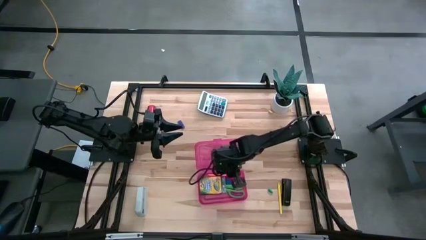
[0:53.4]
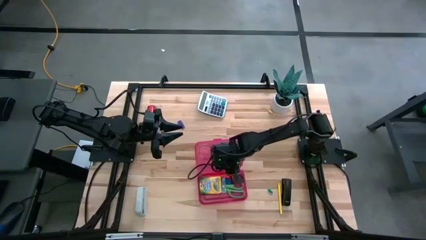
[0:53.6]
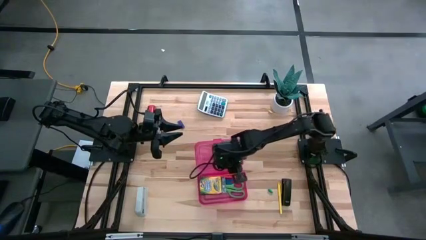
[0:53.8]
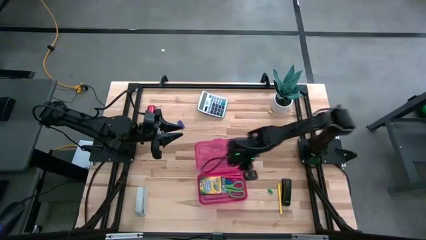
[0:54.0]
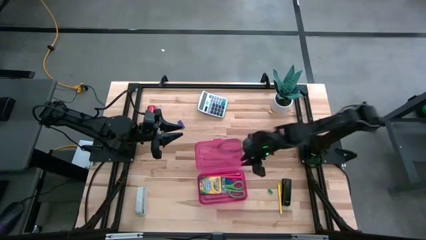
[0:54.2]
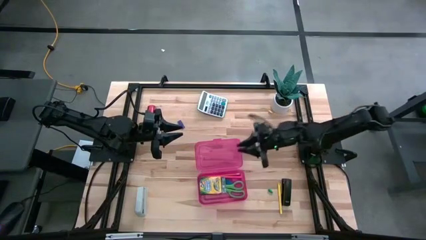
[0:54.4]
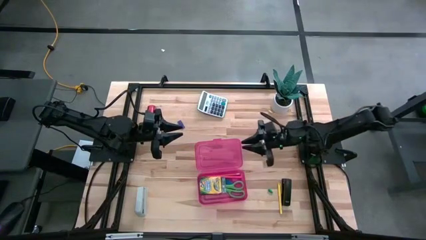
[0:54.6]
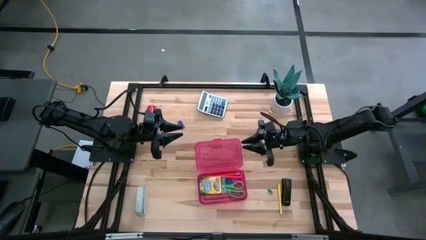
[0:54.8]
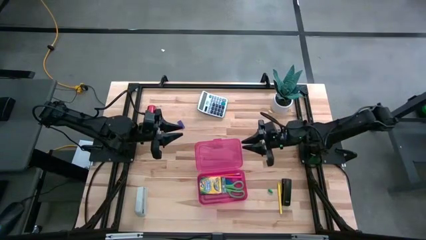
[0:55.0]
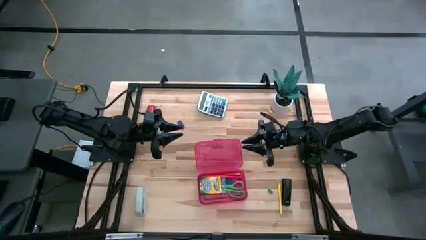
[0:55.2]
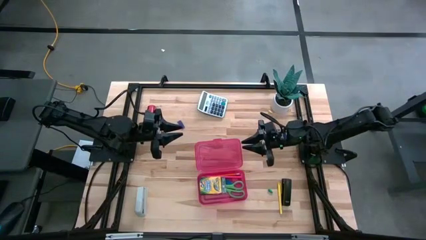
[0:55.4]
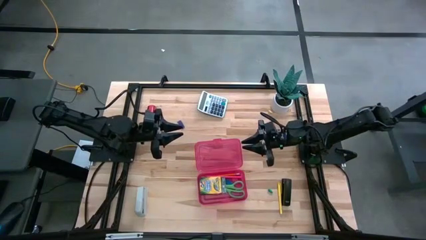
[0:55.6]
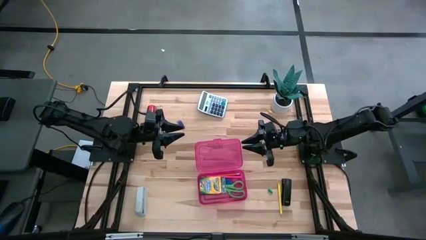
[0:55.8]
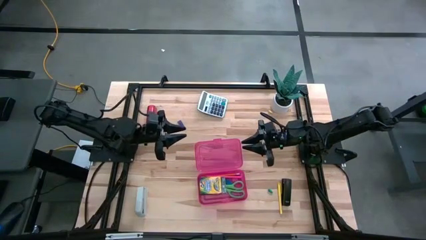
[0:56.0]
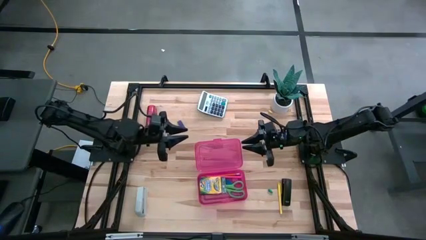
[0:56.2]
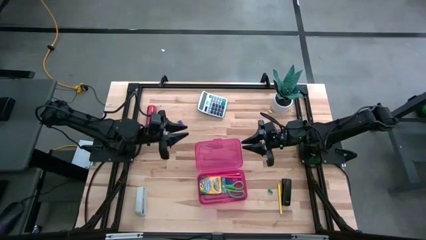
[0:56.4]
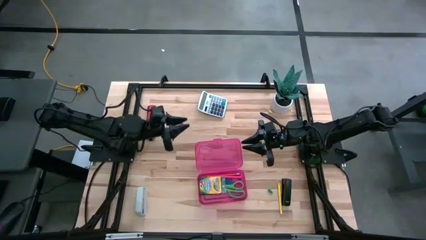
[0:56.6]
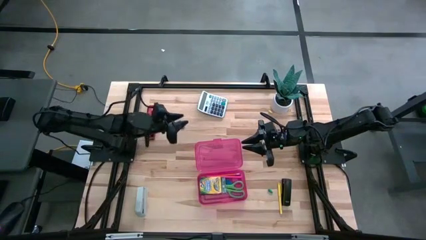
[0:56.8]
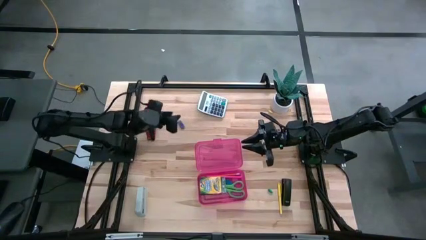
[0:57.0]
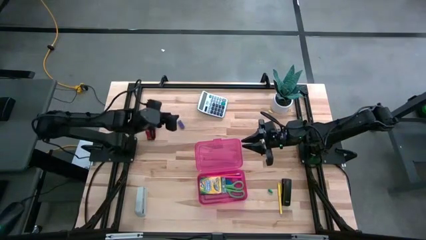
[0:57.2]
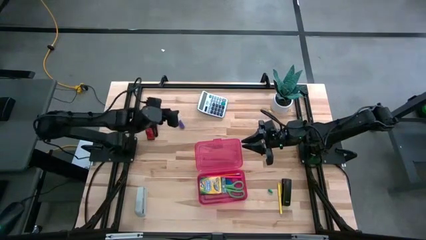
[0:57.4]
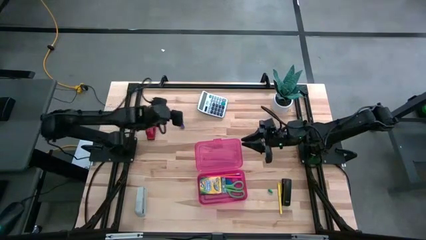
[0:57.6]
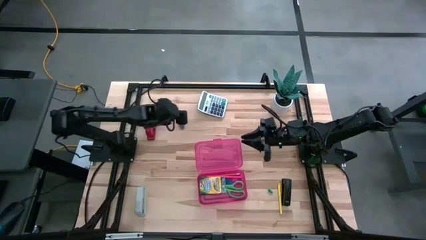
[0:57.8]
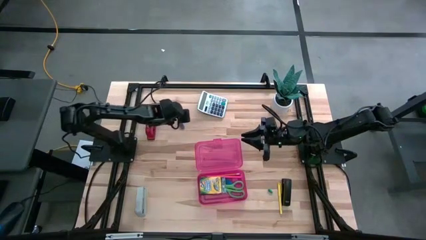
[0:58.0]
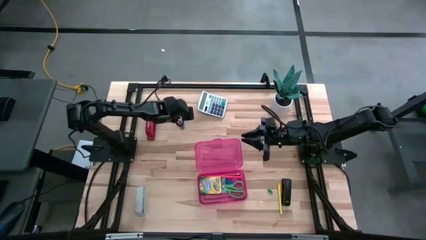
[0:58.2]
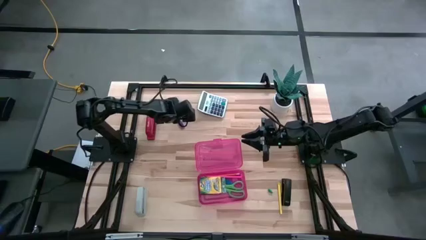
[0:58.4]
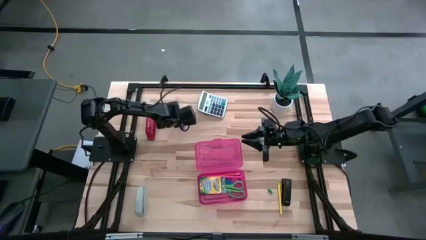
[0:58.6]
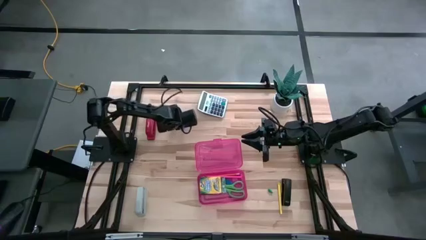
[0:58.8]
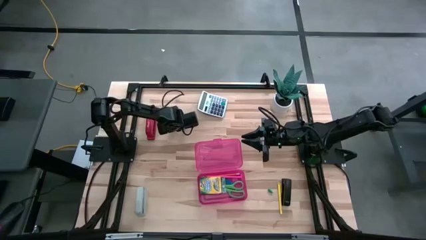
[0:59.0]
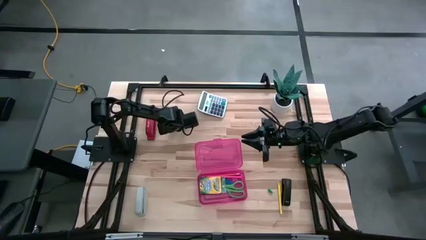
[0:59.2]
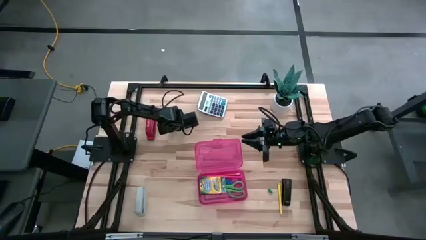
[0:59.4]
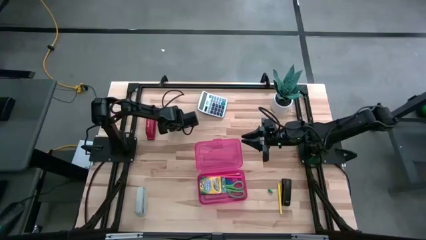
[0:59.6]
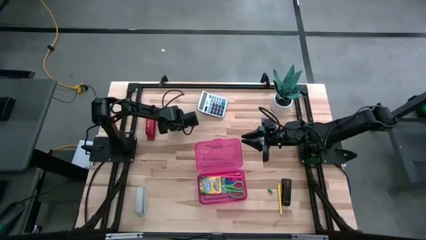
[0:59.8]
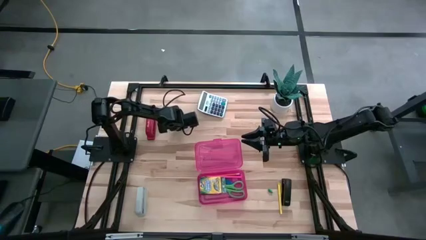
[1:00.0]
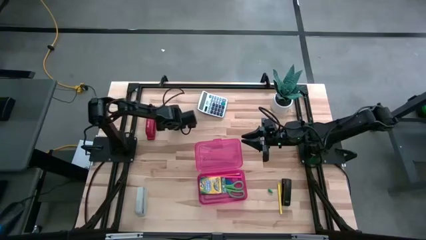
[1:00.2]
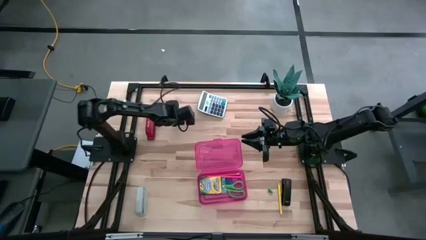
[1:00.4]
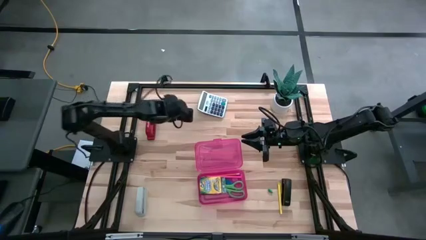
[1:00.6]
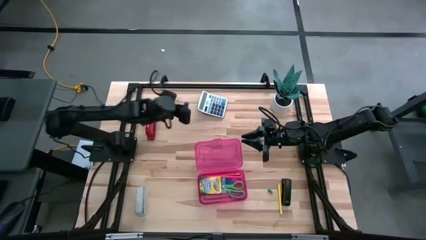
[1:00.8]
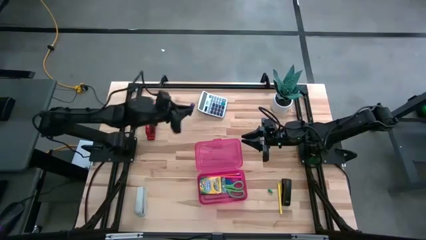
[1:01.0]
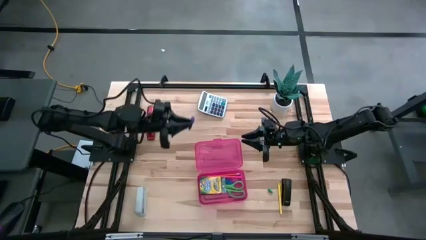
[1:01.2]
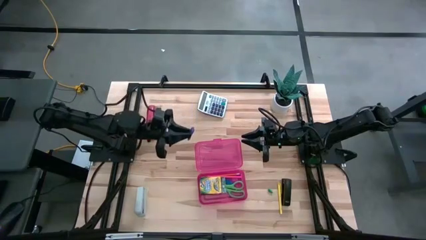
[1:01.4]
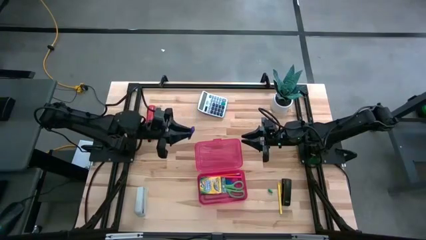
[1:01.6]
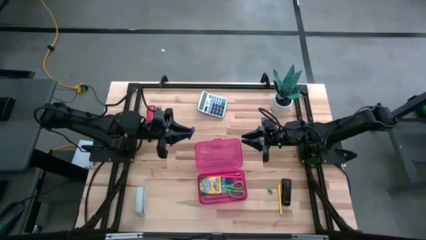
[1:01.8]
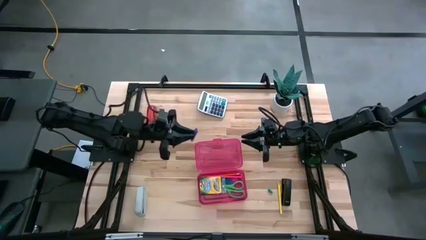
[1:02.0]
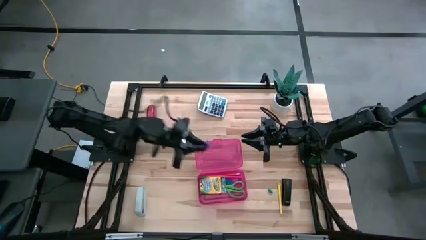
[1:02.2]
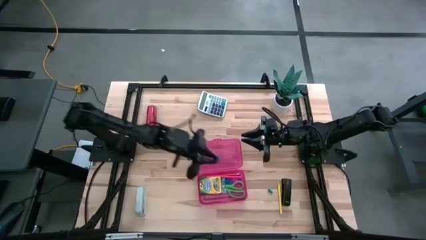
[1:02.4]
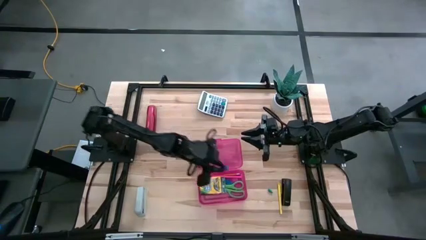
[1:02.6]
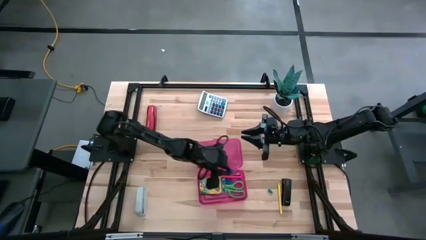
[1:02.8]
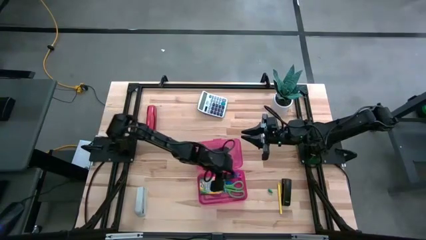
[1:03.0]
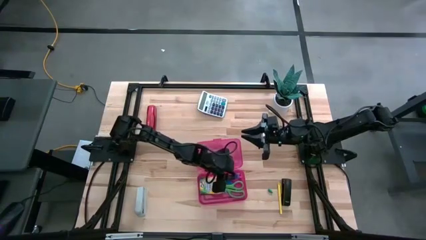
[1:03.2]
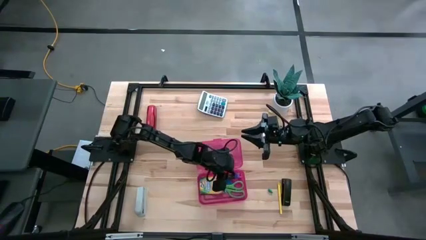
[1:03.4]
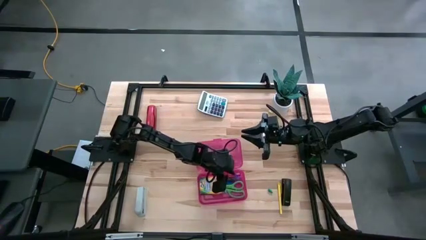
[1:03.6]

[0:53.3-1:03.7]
Task: Pack school essentials
Put the purple eraser into the pink supply box

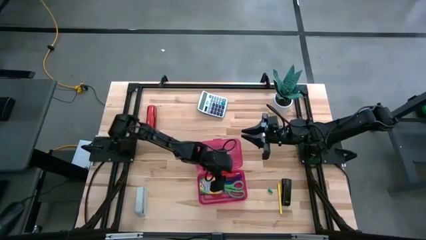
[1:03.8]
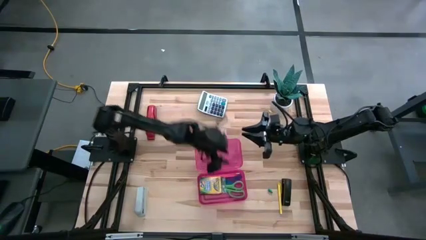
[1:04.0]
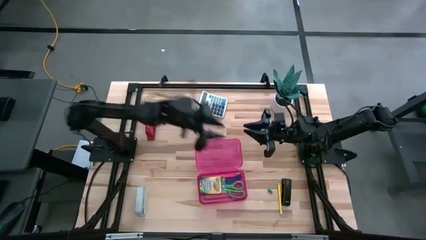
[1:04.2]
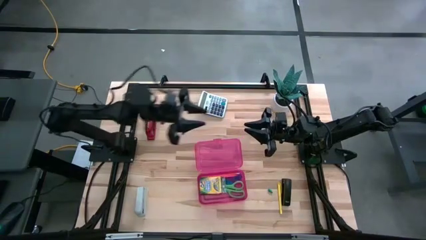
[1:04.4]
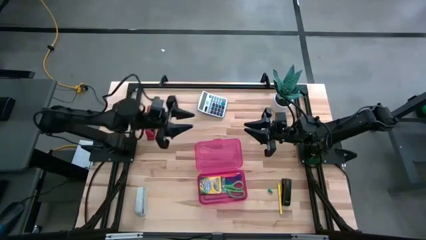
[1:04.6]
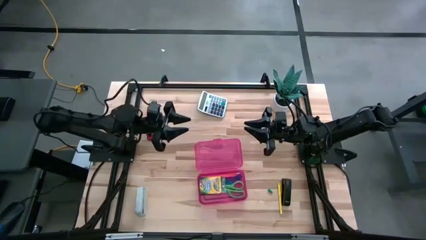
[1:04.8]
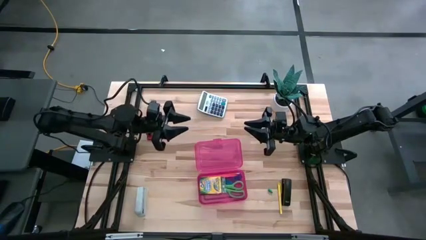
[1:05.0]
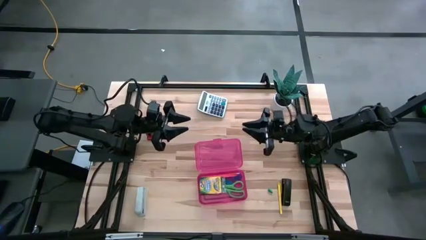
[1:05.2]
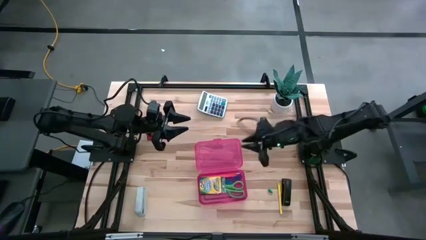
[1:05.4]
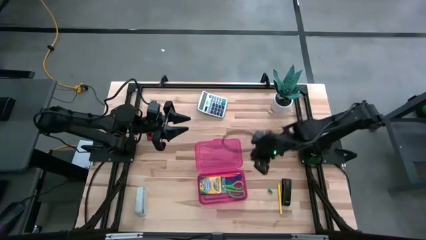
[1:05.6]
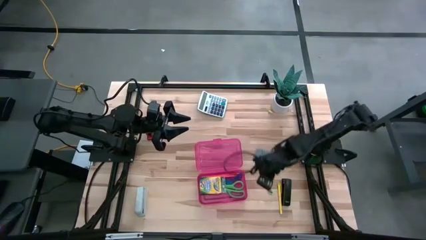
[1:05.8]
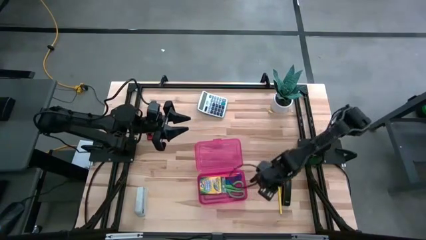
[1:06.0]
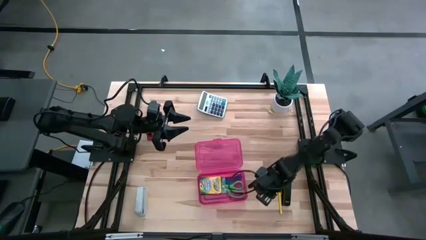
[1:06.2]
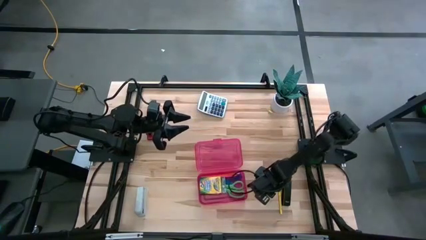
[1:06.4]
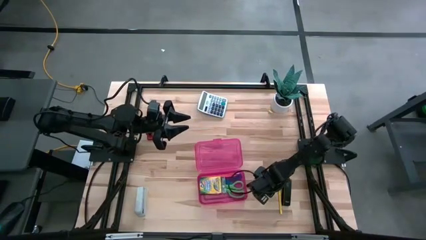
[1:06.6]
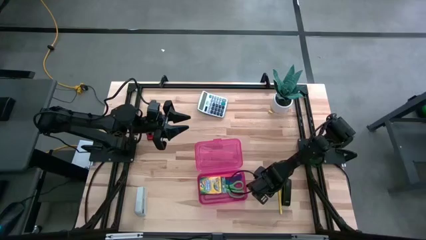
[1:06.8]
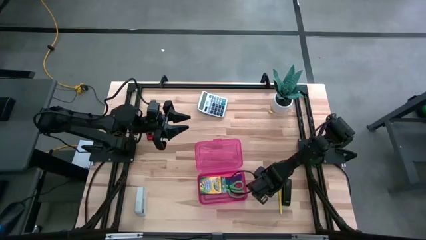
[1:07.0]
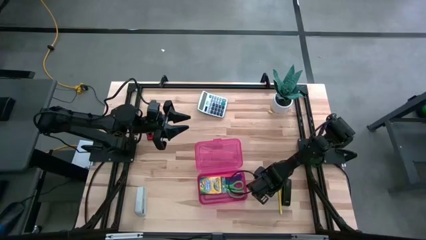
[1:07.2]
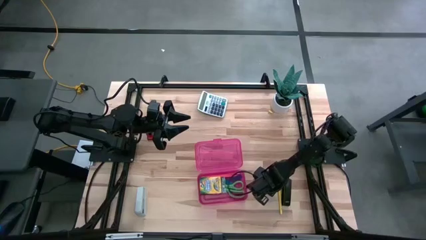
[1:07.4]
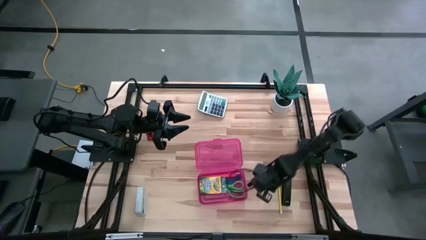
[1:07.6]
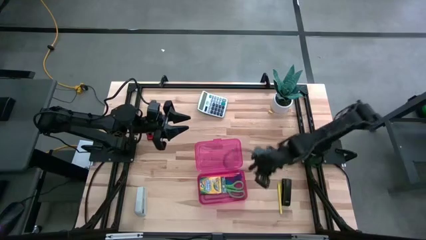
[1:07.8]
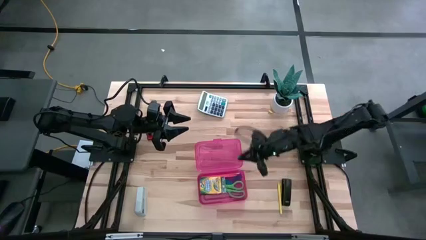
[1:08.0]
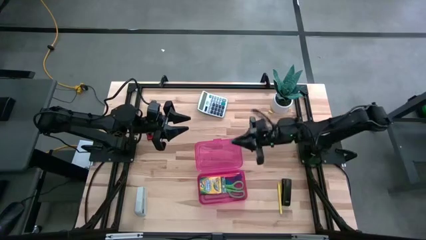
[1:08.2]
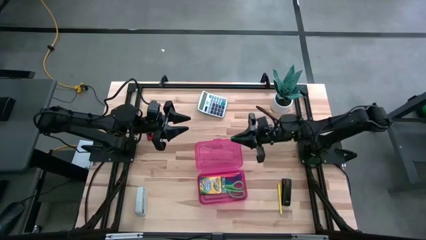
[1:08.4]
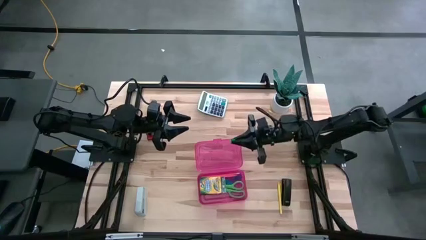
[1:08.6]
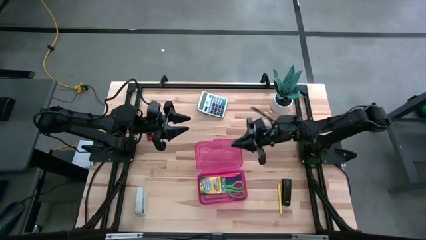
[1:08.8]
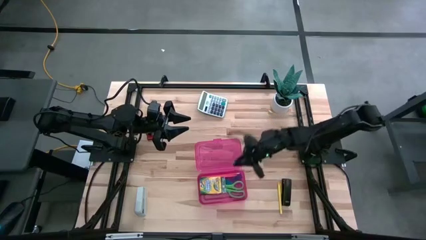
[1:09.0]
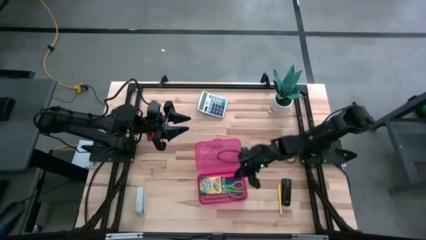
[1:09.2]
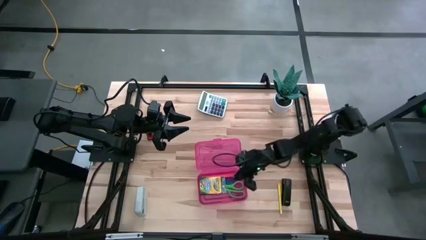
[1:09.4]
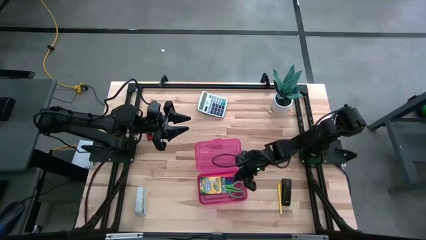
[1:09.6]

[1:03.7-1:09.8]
Put the green pencil top eraser into the pink supply box

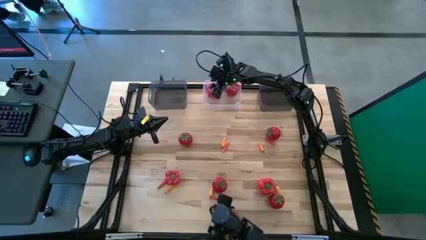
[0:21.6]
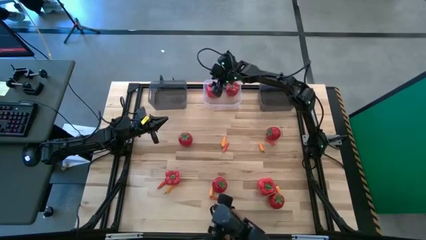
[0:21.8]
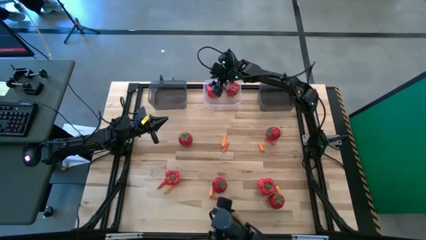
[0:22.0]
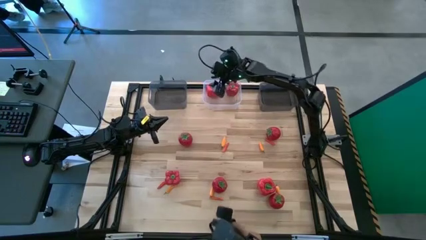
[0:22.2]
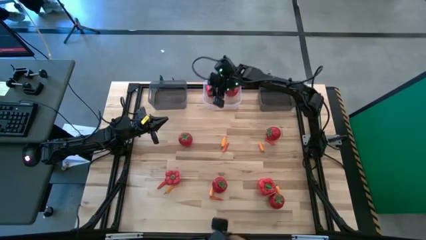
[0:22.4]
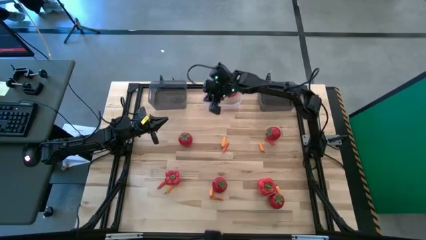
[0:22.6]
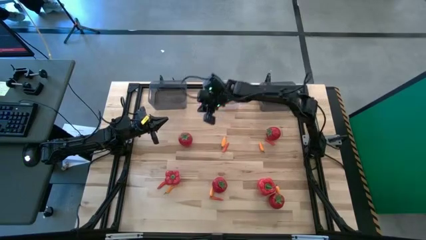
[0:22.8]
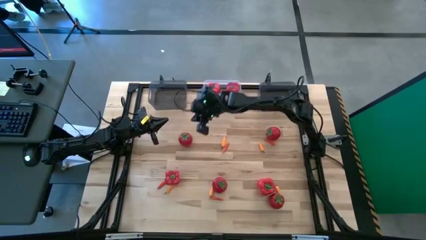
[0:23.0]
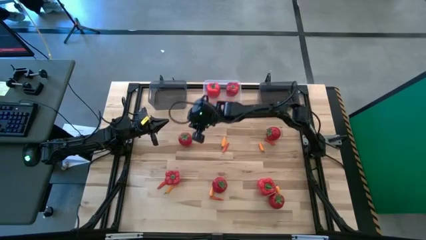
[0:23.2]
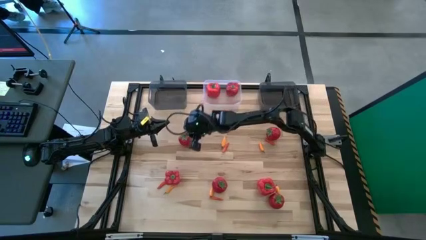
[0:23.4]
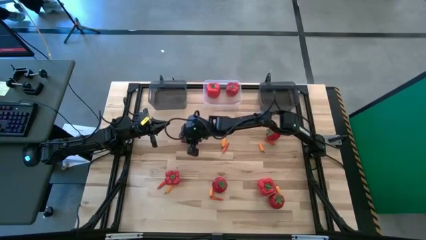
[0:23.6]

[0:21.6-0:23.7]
Task: Sort produce into baskets
Put the red tomato into the right black bin
